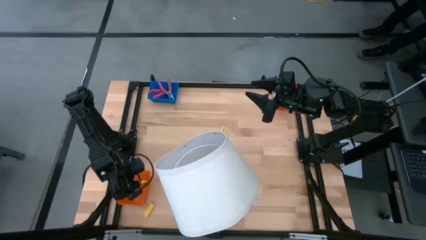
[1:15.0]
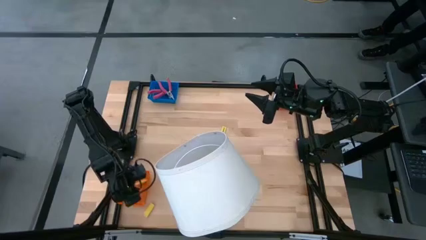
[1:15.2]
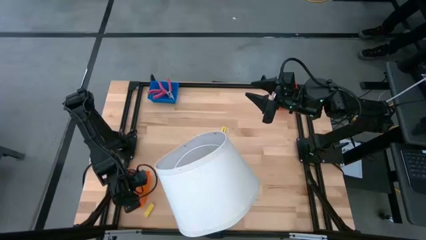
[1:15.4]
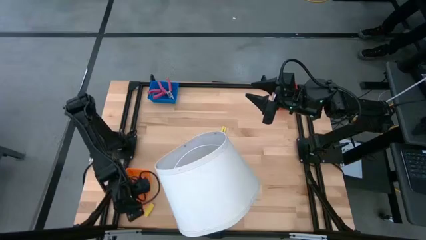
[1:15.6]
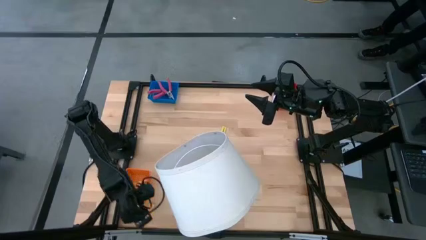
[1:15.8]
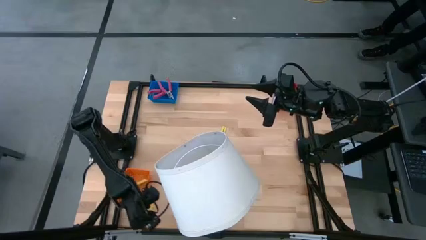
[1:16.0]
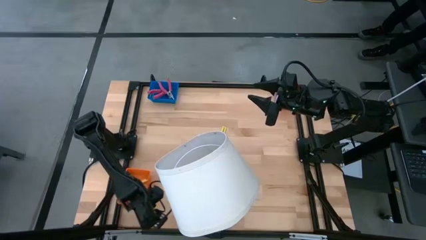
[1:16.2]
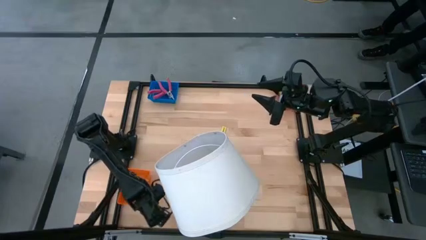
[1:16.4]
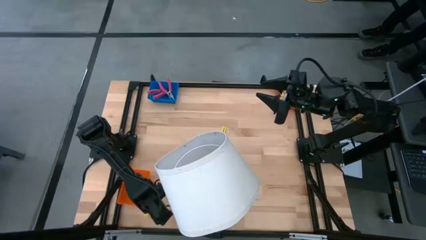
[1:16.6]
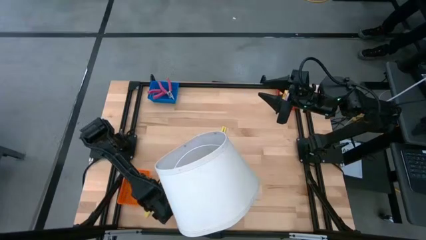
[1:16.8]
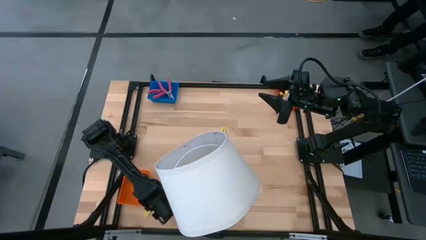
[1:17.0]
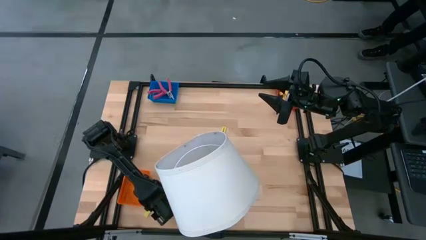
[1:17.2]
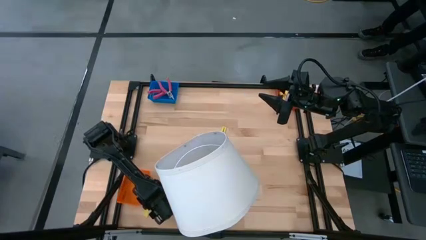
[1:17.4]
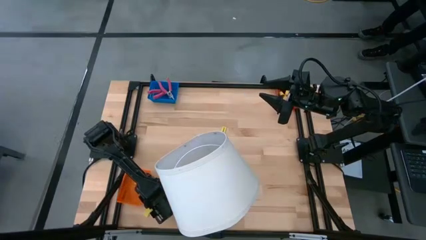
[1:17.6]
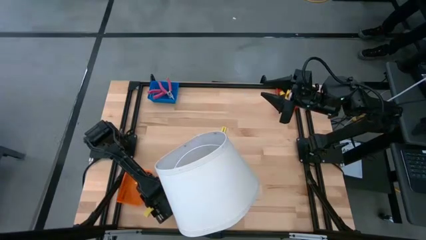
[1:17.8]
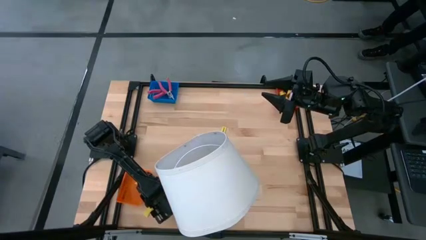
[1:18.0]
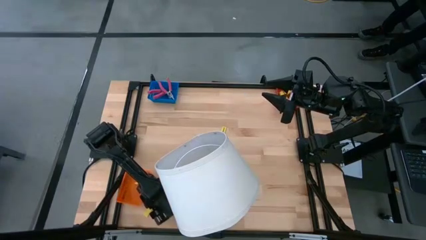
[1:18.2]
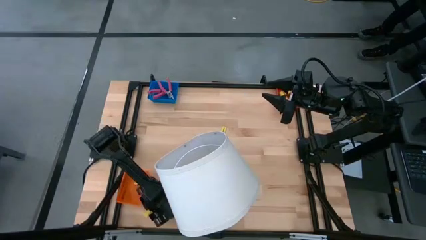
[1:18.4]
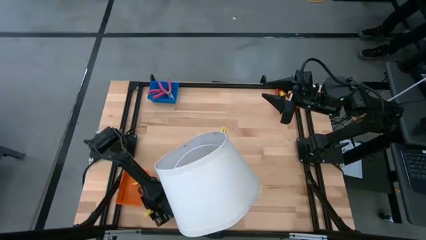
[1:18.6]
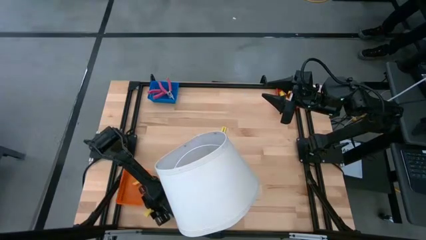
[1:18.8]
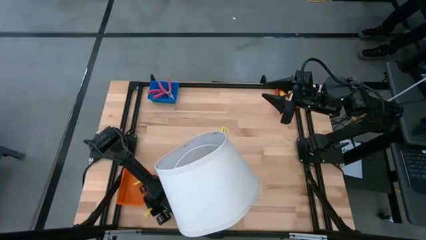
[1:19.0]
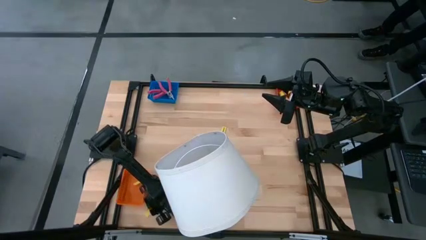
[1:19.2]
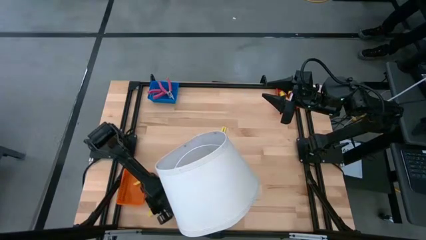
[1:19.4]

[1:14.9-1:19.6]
Task: Pick & Place School Supplies
Put the yellow eraser into the orange basket

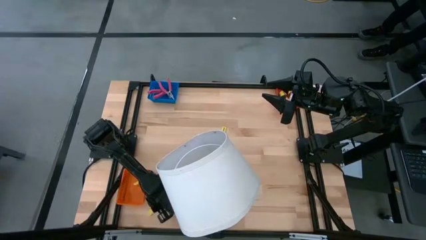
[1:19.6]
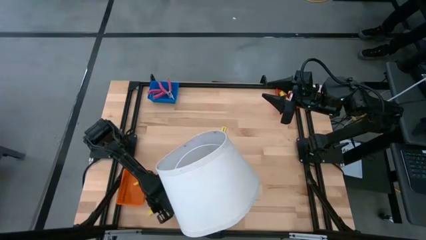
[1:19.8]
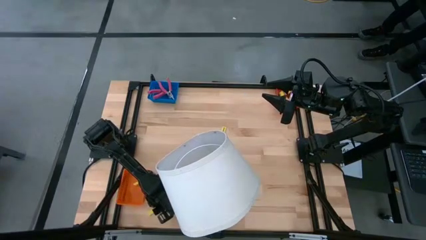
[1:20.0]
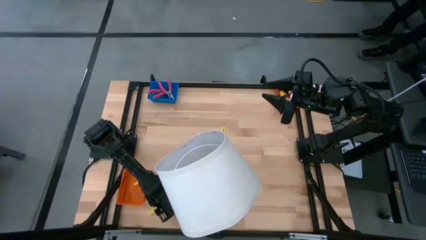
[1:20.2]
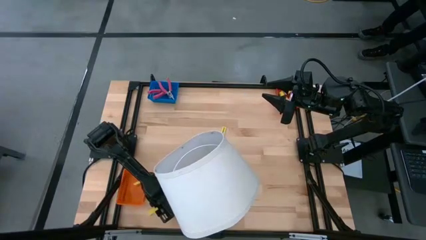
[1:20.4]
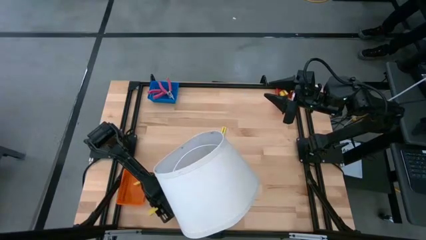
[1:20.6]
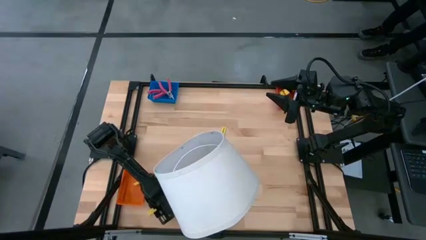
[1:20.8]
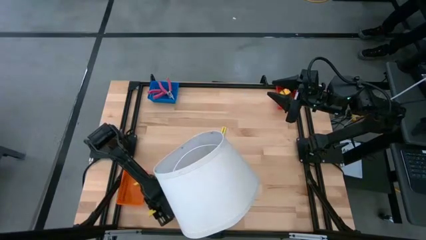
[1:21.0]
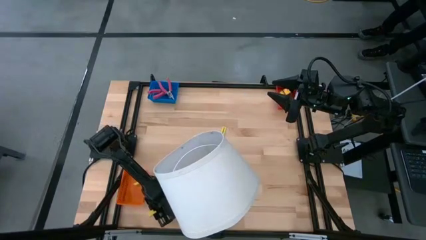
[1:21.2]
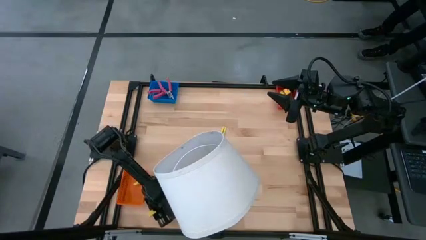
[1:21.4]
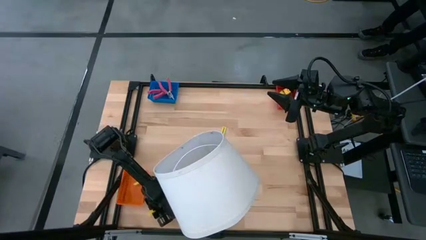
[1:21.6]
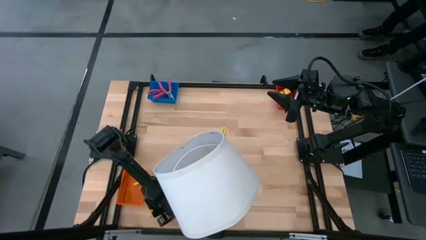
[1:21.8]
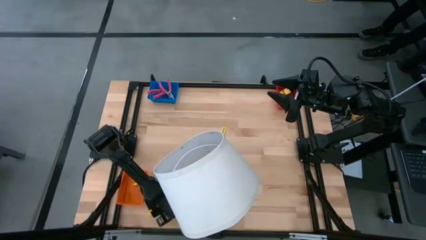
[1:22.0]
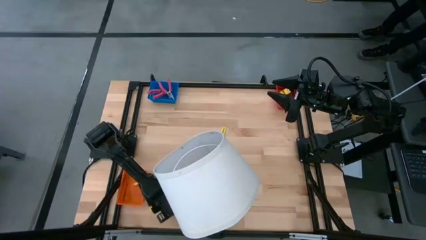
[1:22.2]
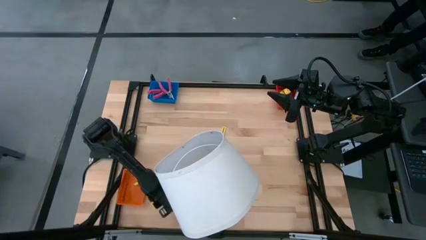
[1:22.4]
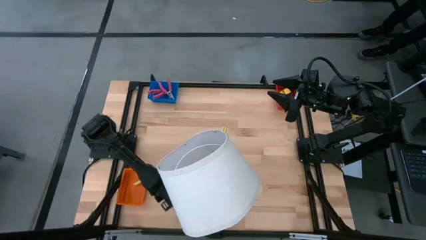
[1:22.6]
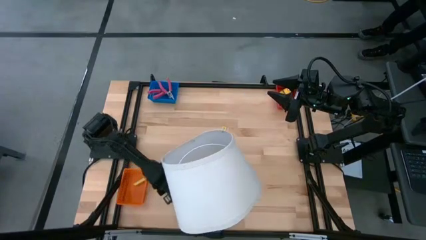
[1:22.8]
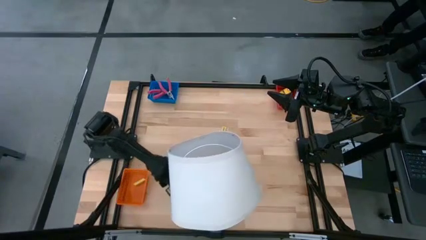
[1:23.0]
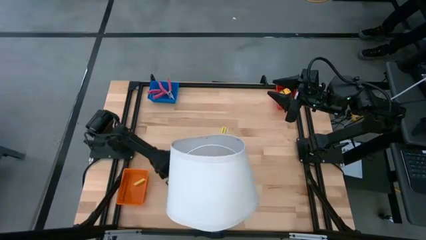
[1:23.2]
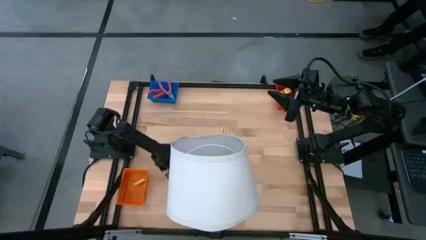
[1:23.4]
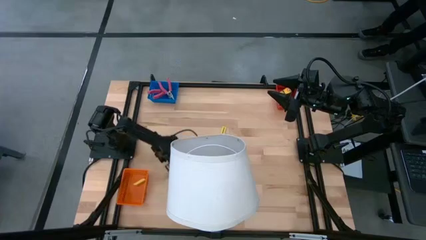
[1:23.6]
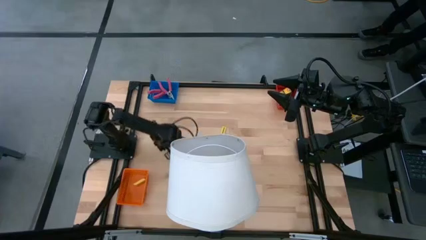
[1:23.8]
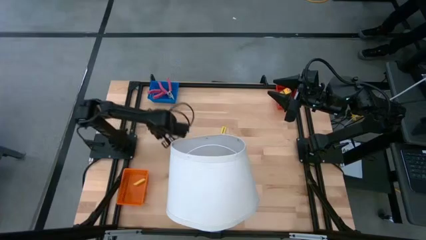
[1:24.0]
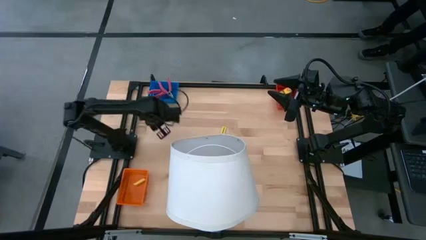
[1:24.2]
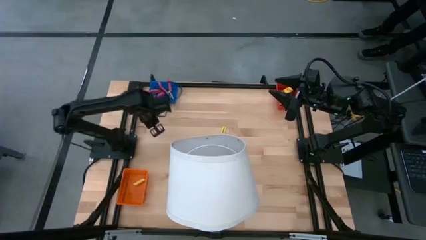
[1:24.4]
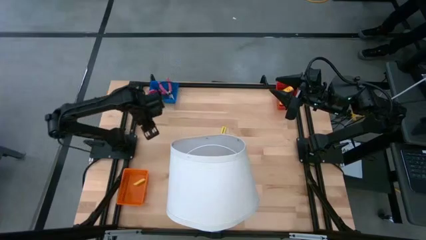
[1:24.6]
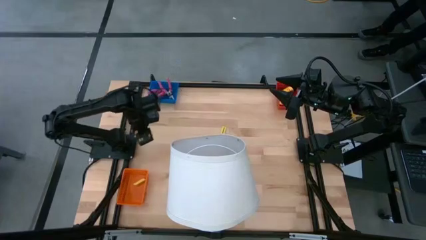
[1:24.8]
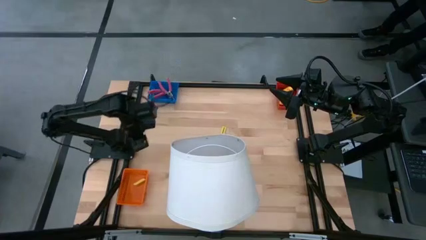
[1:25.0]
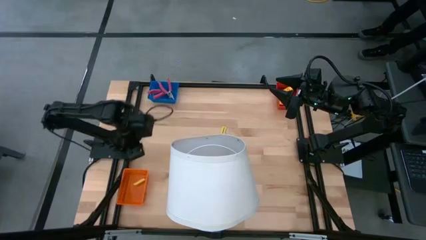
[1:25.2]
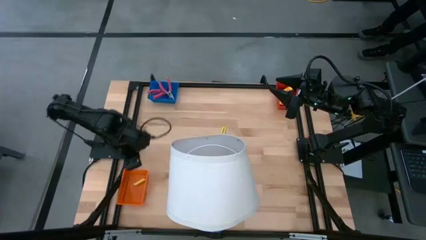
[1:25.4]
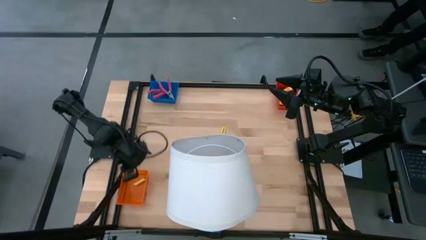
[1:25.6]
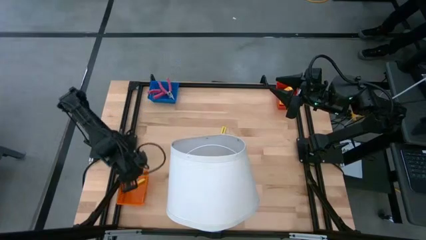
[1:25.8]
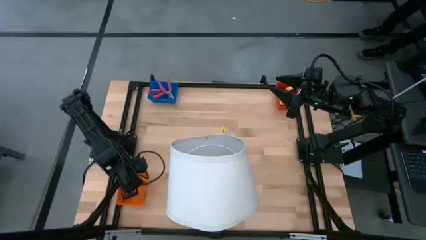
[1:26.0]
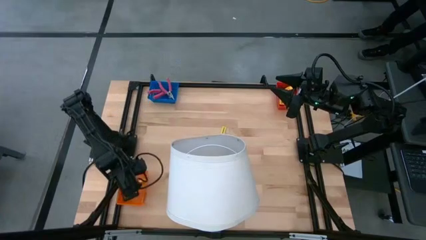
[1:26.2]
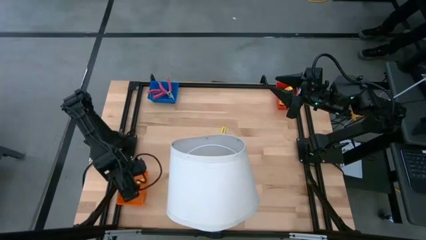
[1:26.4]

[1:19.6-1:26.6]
Put the yellow eraser into the orange basket
